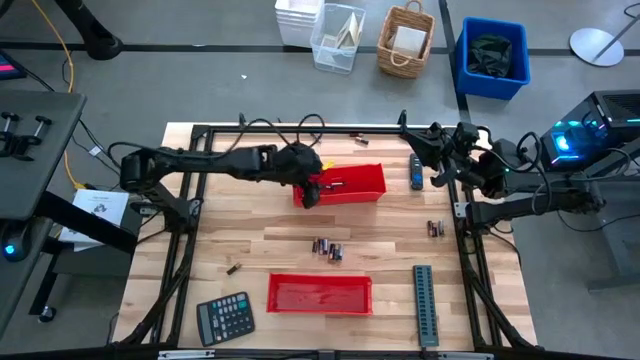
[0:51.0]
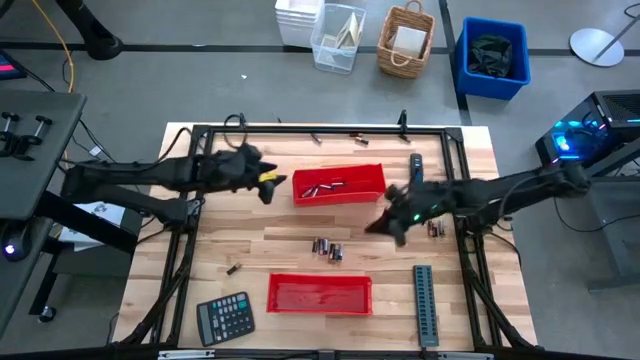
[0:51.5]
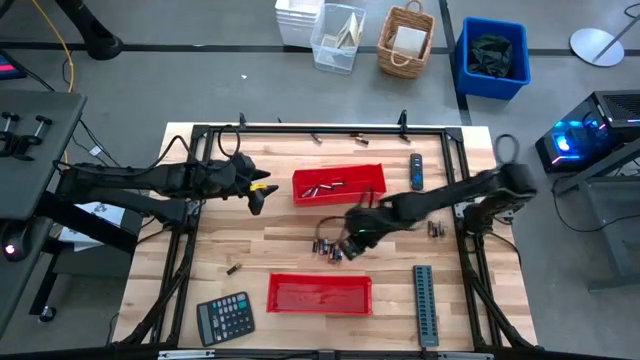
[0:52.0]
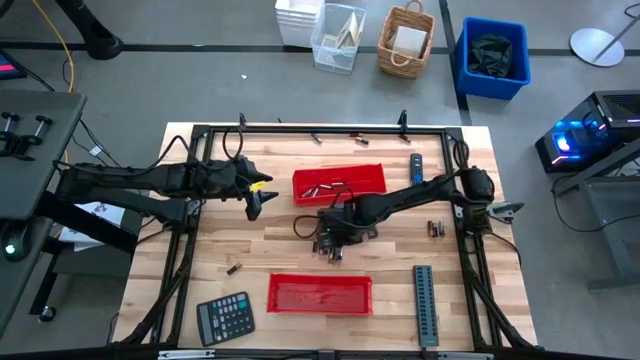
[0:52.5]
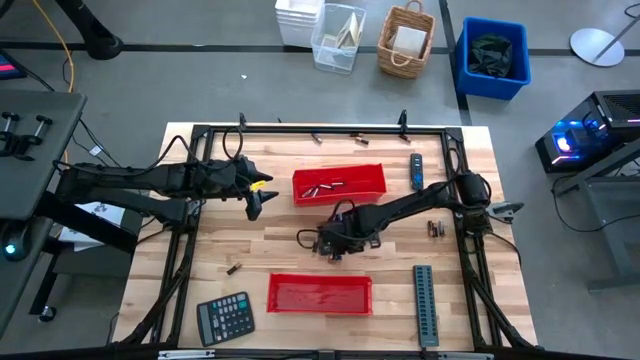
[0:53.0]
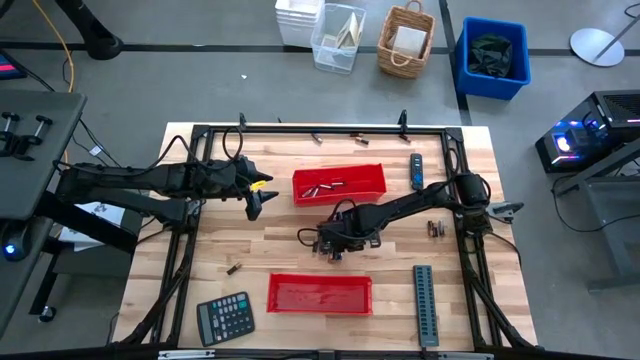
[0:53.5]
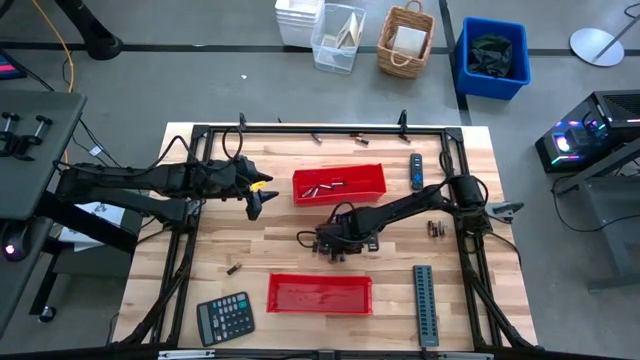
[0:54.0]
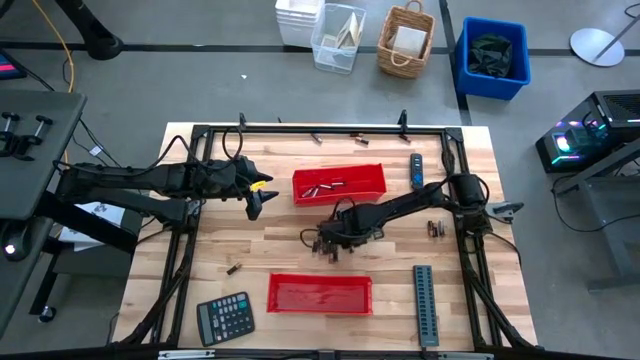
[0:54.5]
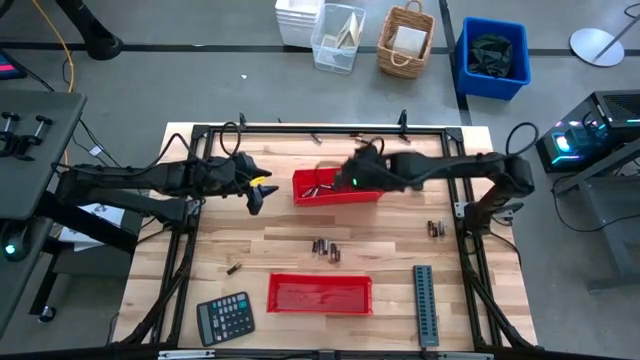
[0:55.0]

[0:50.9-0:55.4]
Task: Sort batteries
Put the silver battery into the top red bin

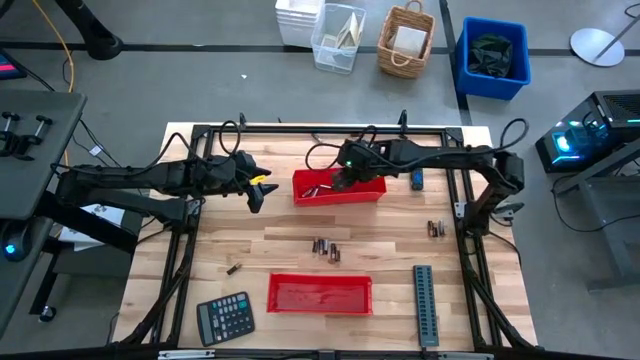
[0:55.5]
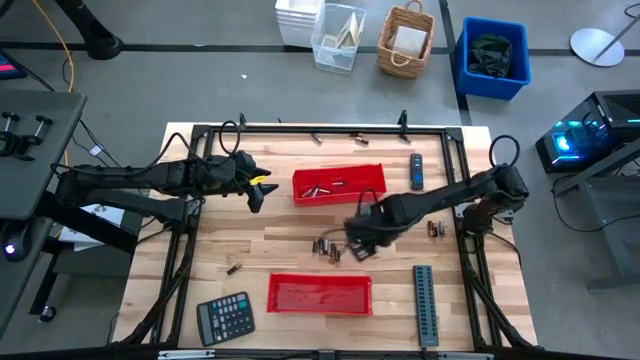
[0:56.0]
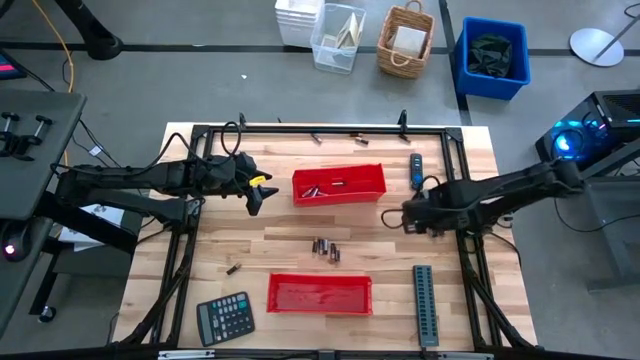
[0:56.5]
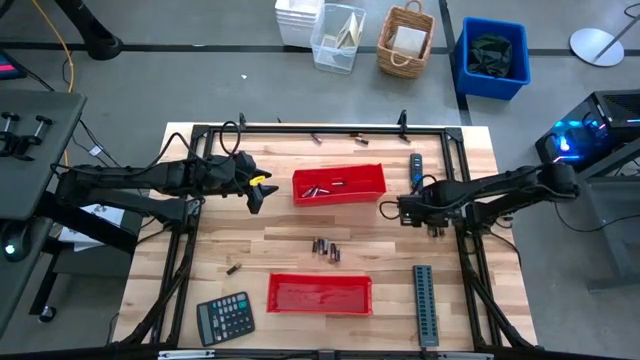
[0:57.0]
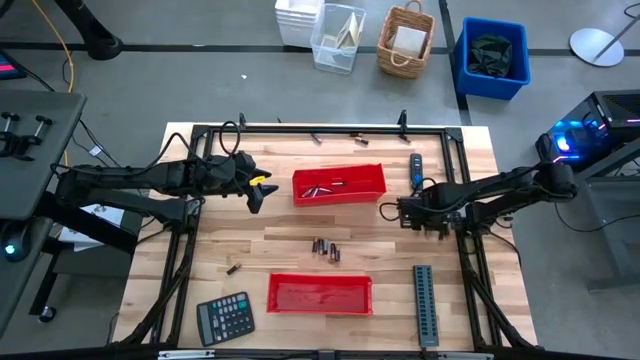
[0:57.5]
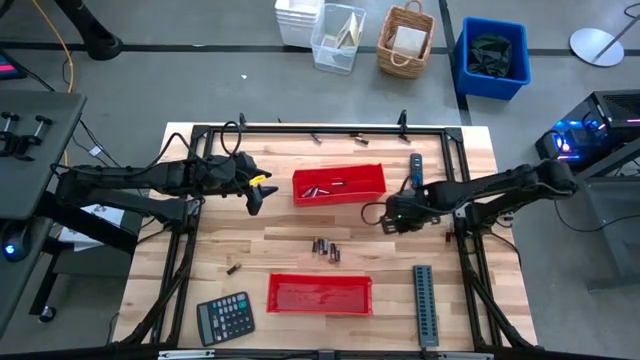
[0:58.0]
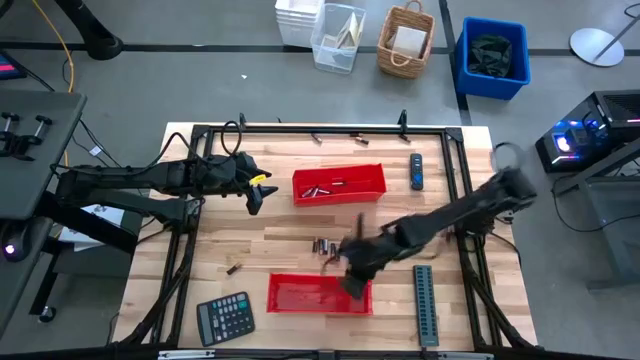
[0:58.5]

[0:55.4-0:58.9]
Put the black battery into the bottom red bin

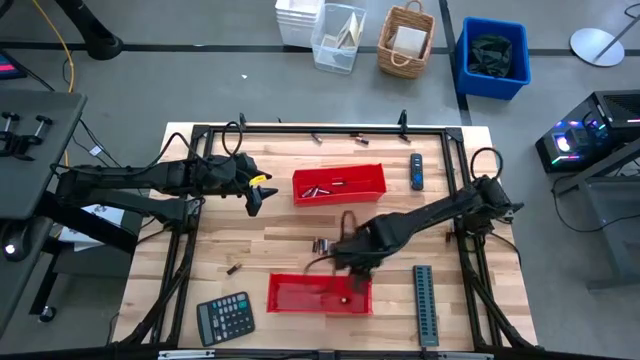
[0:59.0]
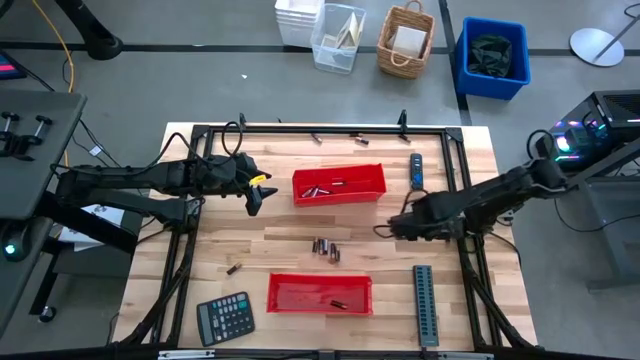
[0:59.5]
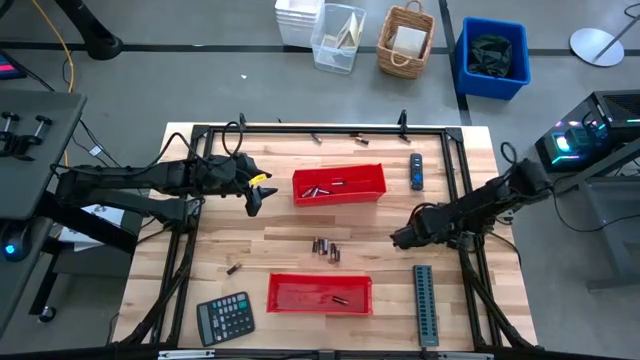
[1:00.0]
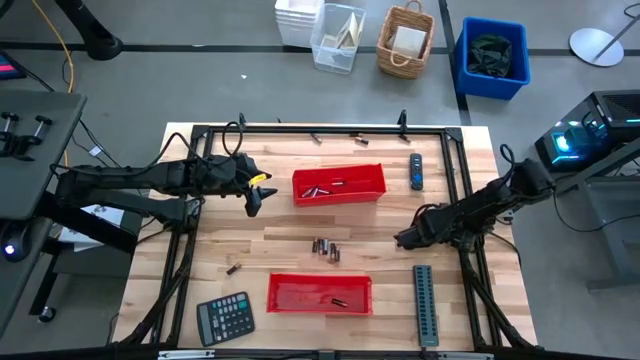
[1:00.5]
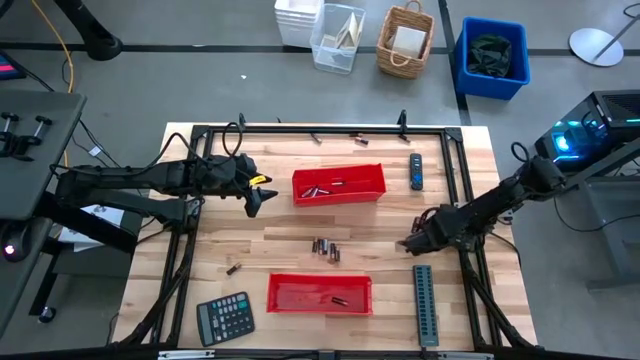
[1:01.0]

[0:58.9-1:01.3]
Put the black battery into the bottom red bin

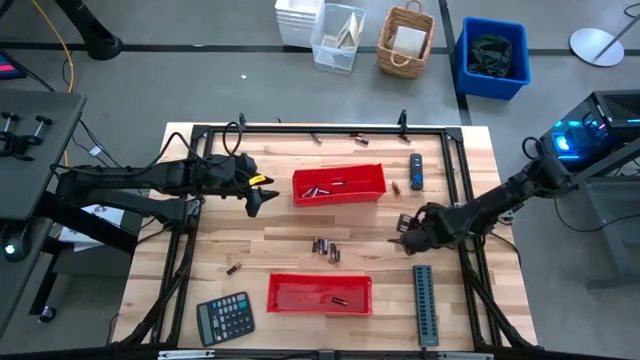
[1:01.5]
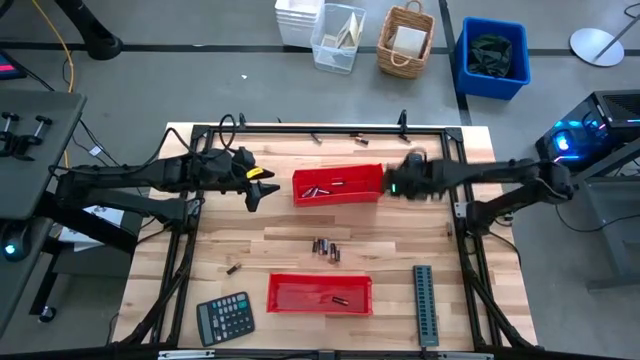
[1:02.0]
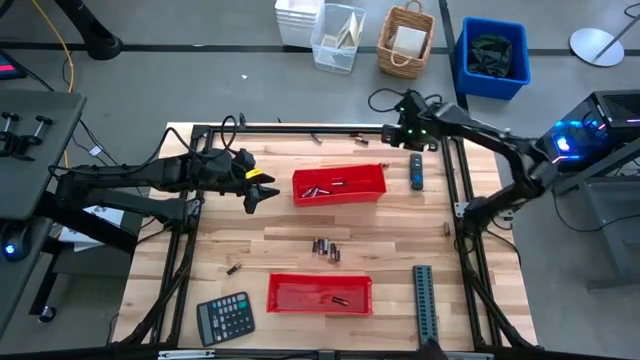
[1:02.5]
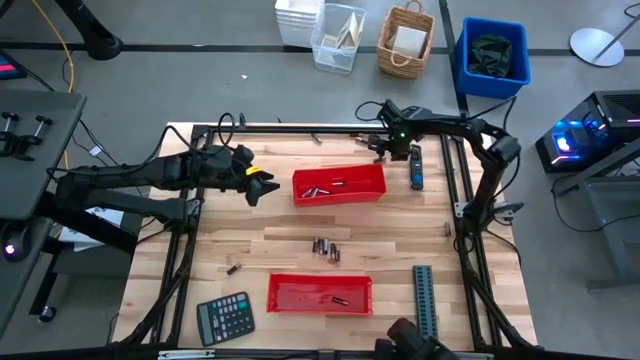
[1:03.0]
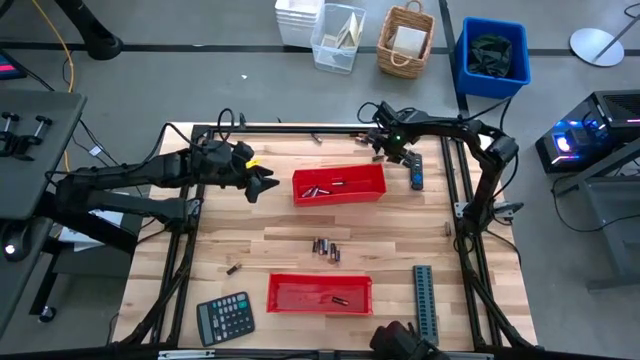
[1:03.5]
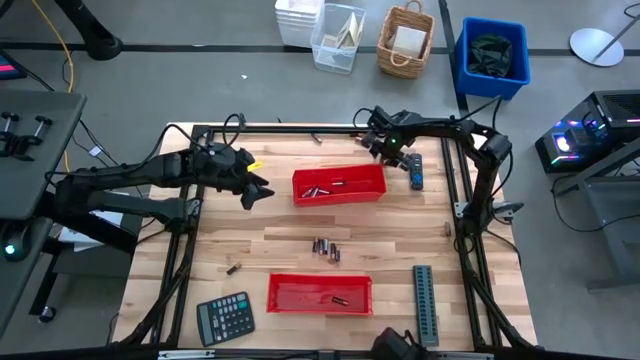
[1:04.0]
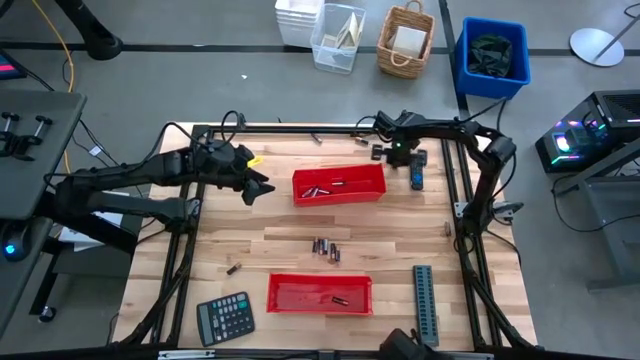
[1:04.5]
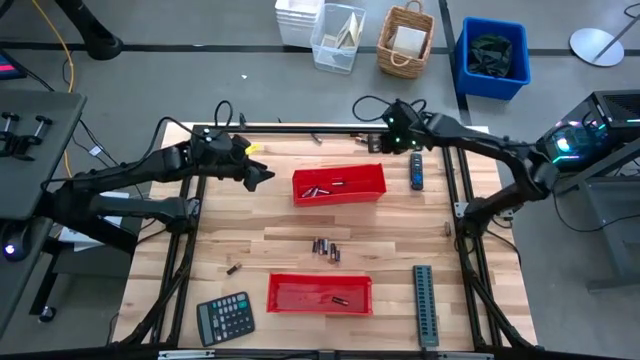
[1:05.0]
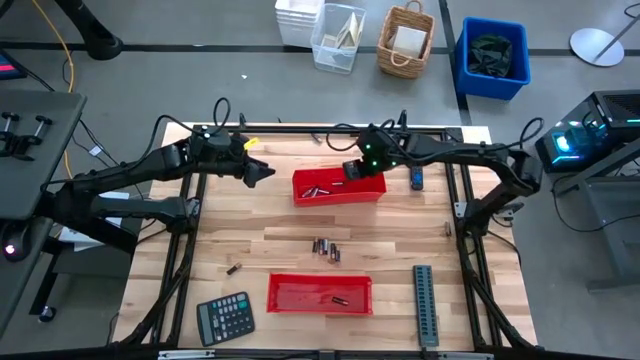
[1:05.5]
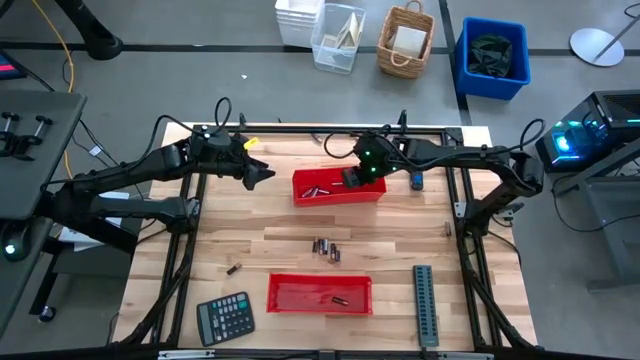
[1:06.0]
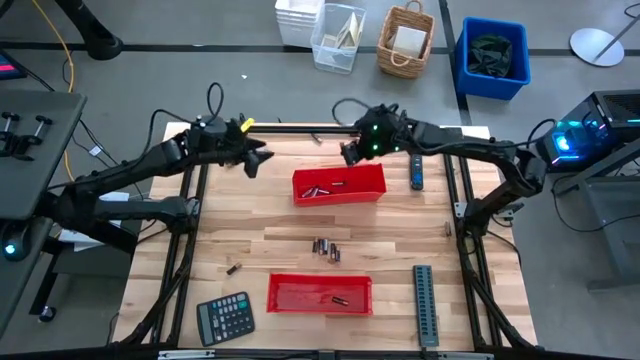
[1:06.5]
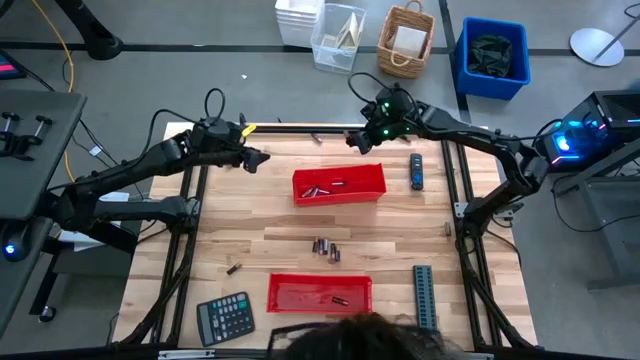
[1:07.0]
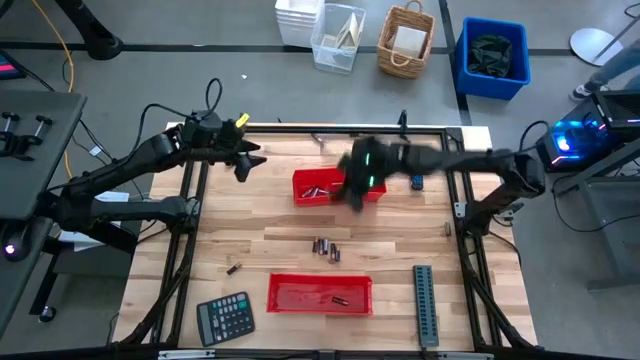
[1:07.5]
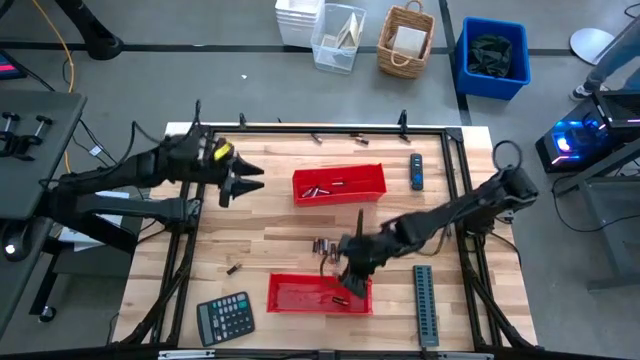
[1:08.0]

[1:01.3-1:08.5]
Put the black battery into the bottom red bin

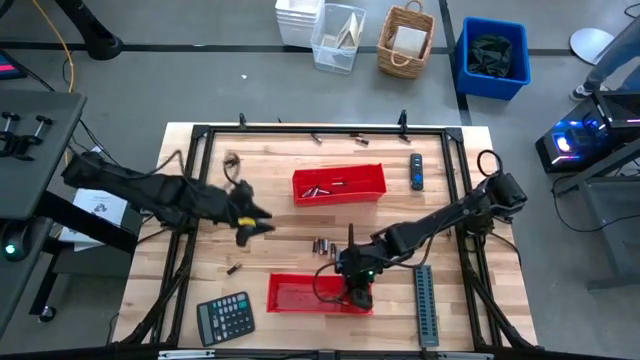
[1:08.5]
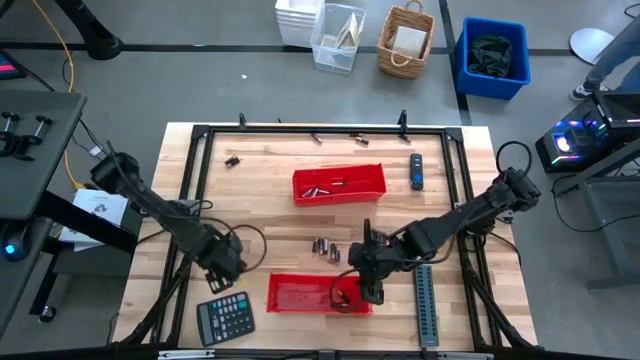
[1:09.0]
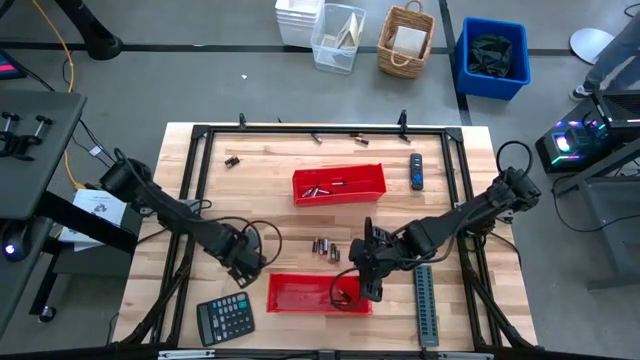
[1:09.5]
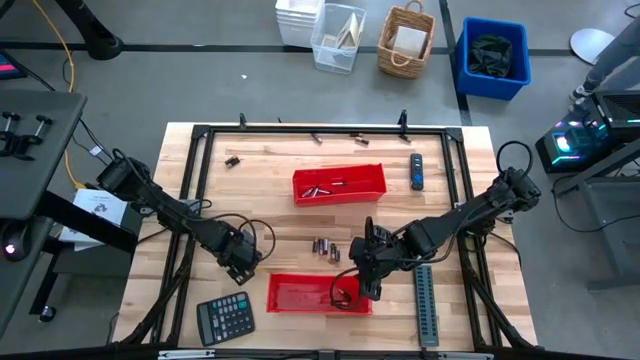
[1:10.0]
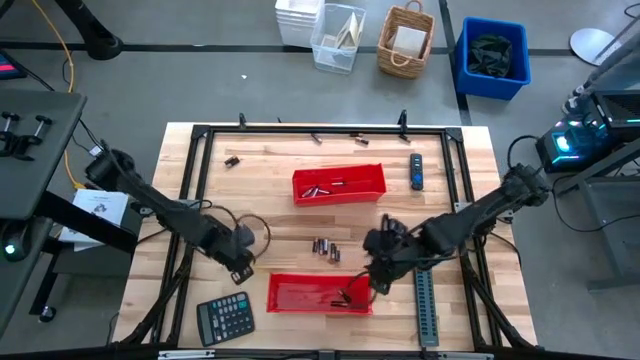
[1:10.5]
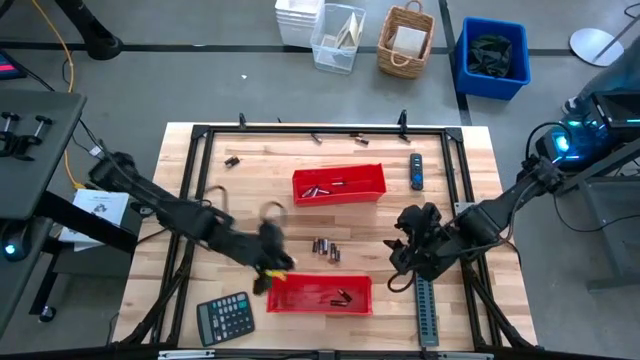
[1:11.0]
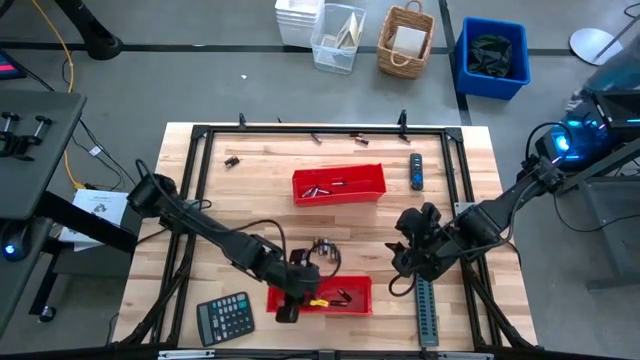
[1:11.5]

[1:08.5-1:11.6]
Put the black battery into the bottom red bin

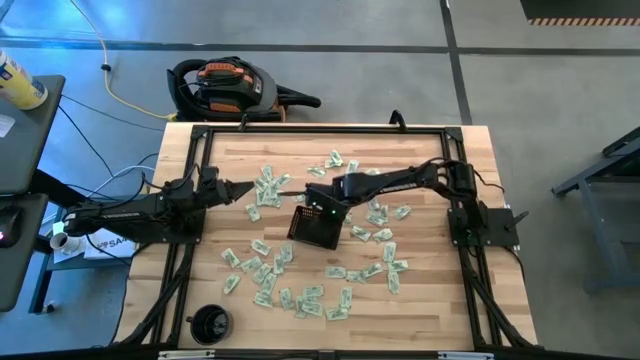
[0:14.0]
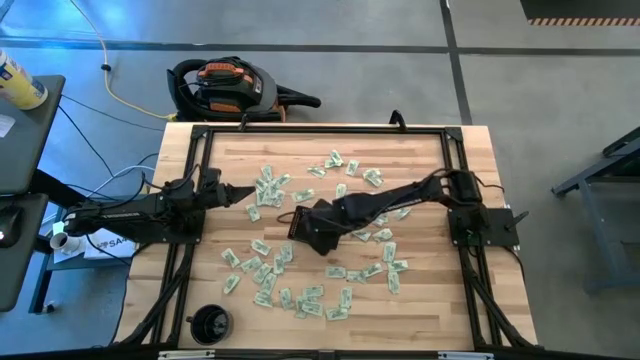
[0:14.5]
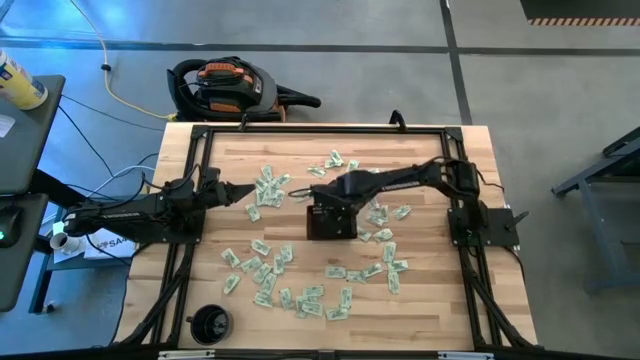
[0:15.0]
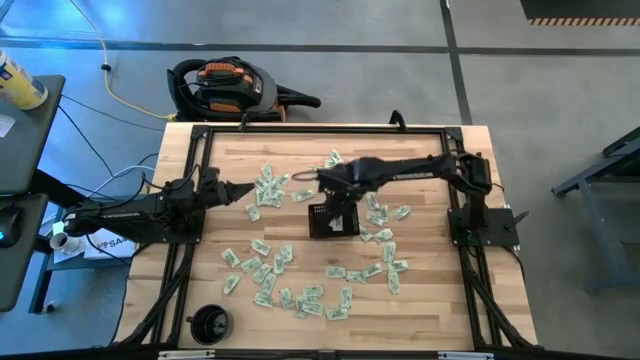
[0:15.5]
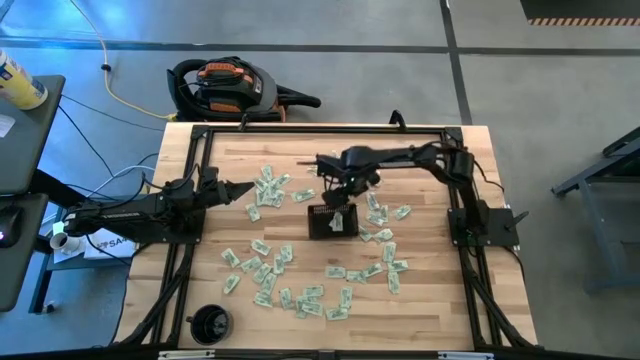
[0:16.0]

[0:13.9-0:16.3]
Task: Pick and place Stevia / Truvia into bins
Adjust the black basket
